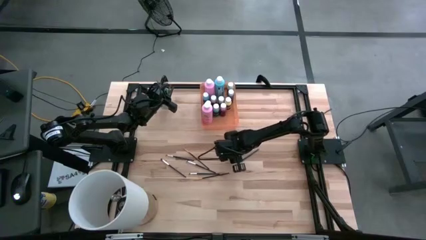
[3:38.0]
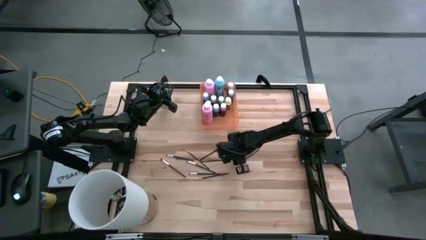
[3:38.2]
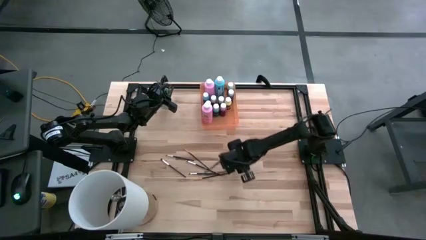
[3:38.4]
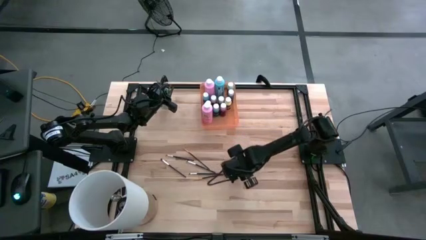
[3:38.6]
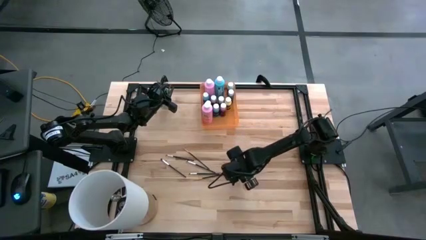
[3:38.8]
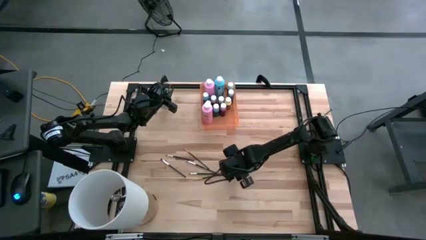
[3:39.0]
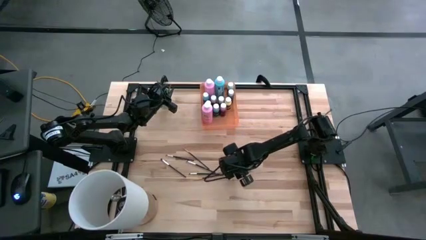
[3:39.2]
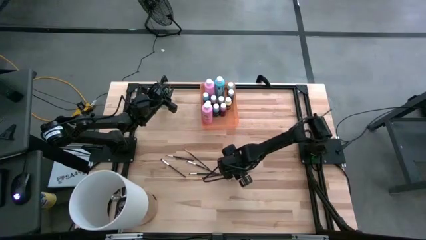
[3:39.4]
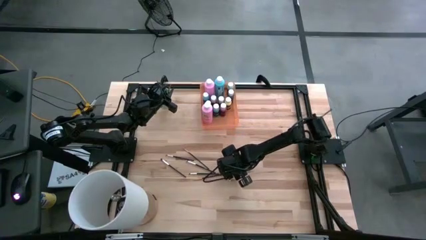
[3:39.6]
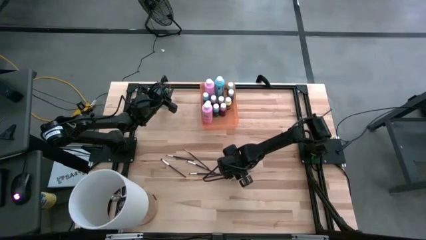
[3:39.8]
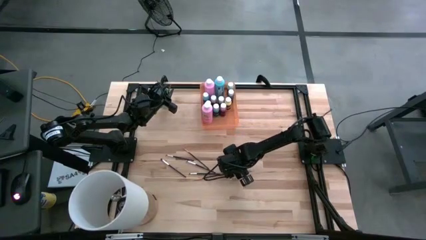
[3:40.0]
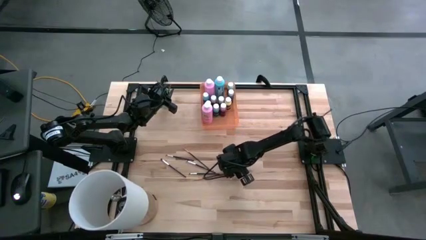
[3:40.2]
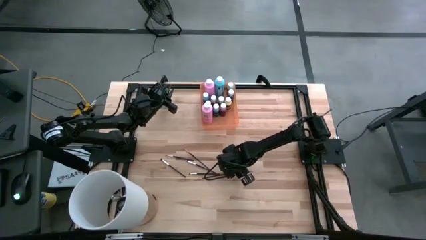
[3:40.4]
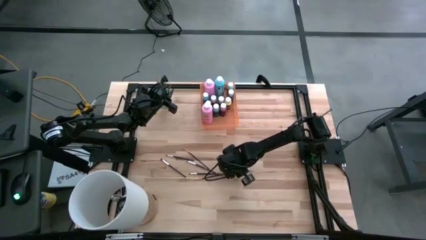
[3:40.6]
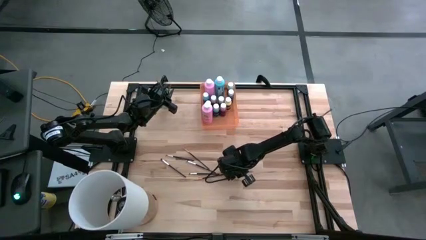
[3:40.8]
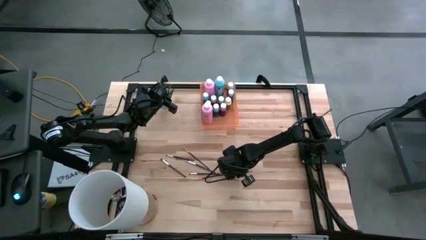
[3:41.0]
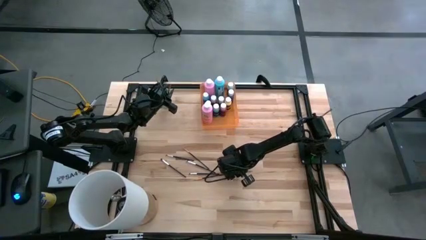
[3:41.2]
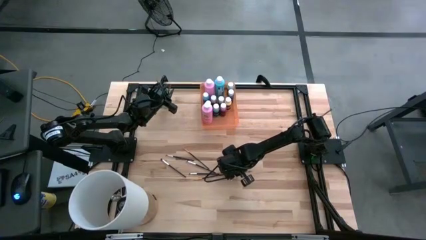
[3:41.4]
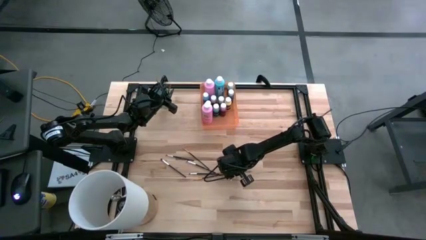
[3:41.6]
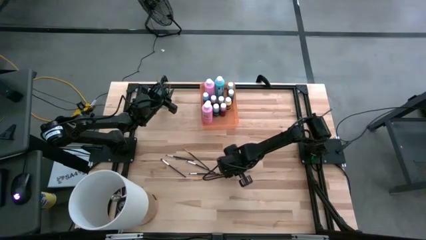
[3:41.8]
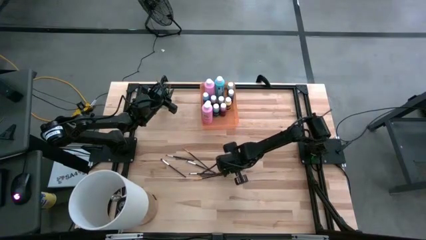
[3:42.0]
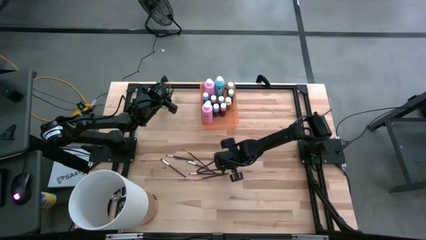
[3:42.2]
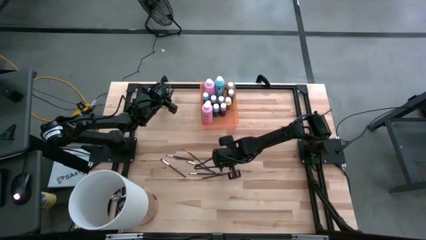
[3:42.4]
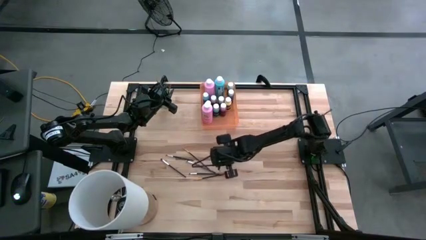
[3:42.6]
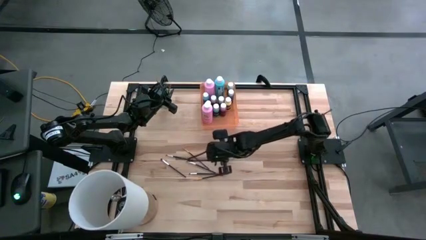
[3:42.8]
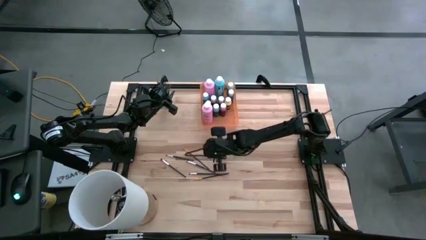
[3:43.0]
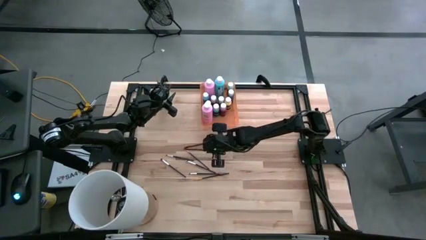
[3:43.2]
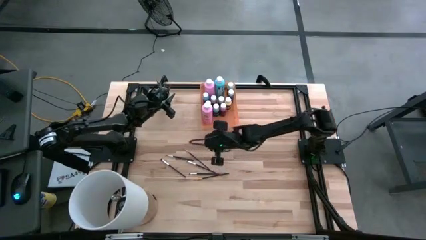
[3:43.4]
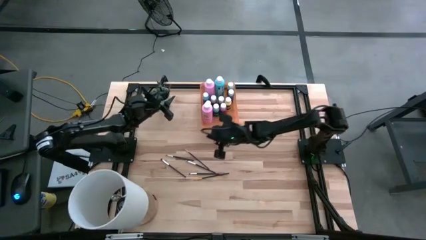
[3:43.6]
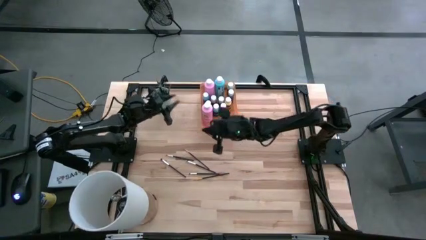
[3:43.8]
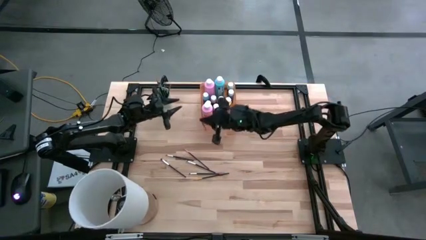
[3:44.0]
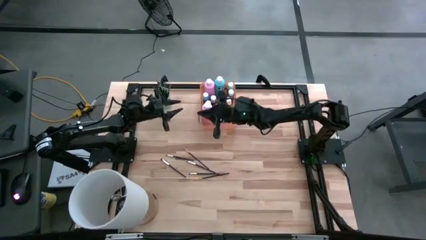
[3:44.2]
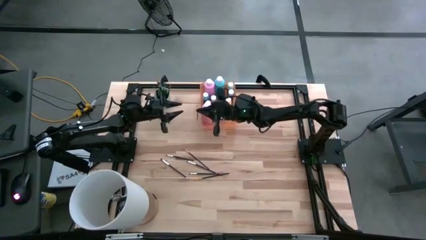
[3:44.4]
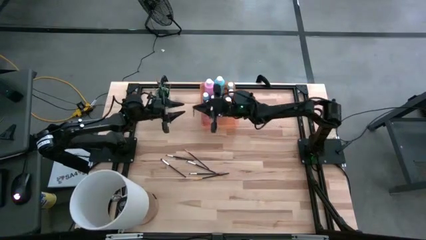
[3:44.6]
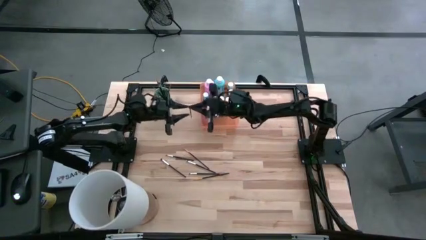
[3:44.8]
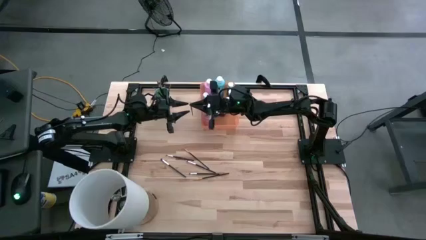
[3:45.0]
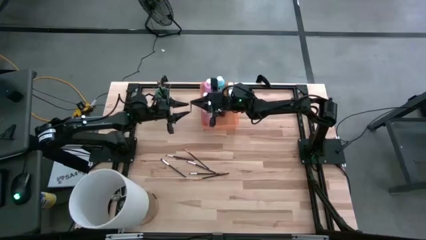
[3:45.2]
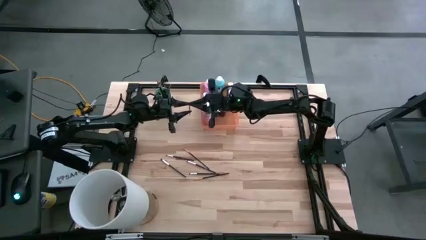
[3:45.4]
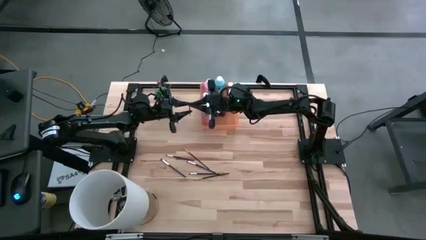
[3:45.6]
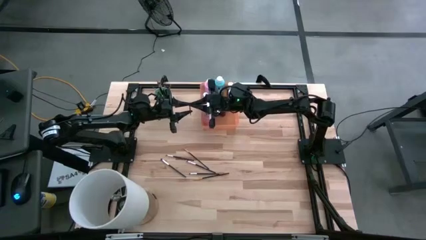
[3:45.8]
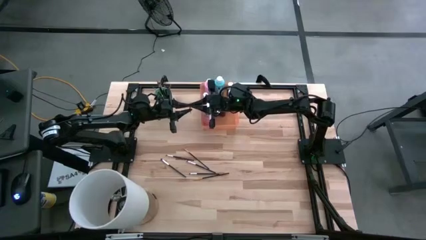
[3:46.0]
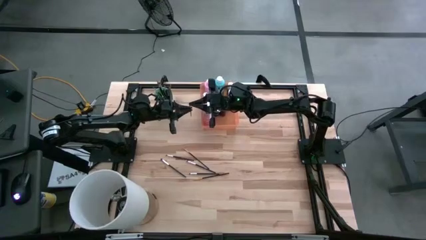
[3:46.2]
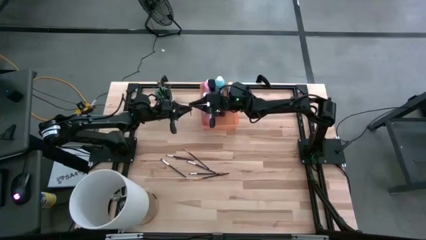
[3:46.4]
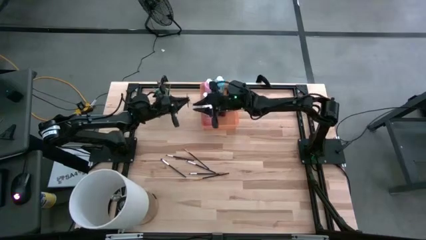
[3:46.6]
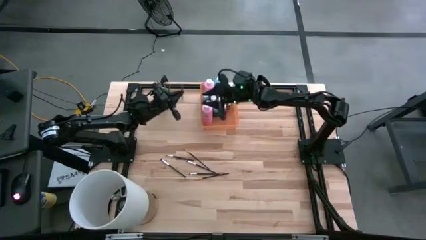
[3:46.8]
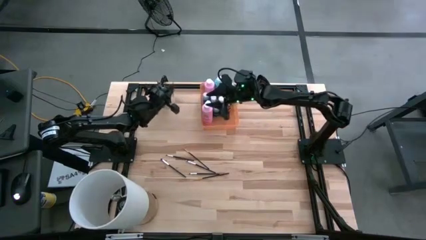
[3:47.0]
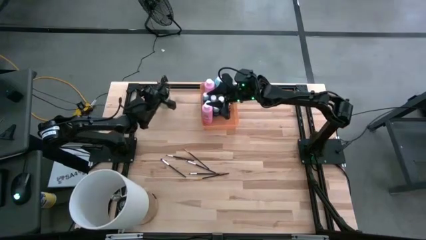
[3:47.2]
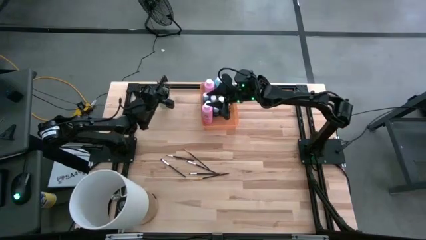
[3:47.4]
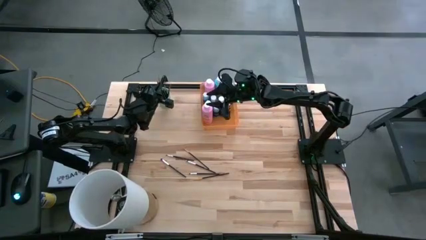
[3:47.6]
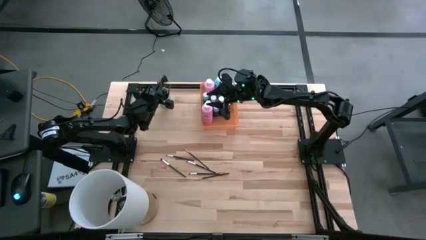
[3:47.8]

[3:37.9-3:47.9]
Task: Pick & Place Paint Supplies
Put the orange paintbrush into the cup
